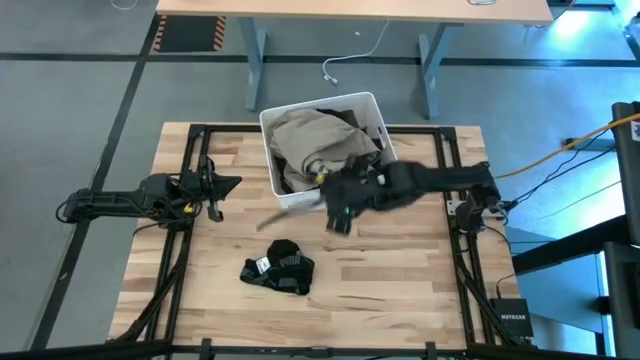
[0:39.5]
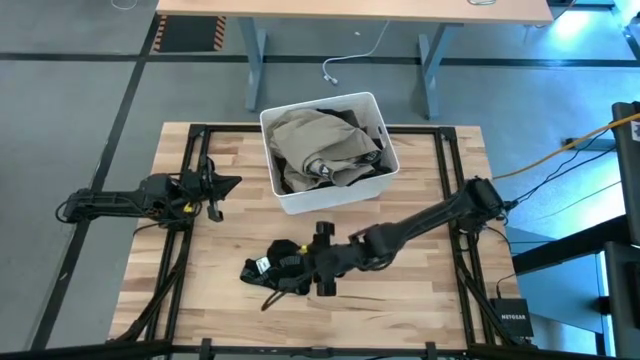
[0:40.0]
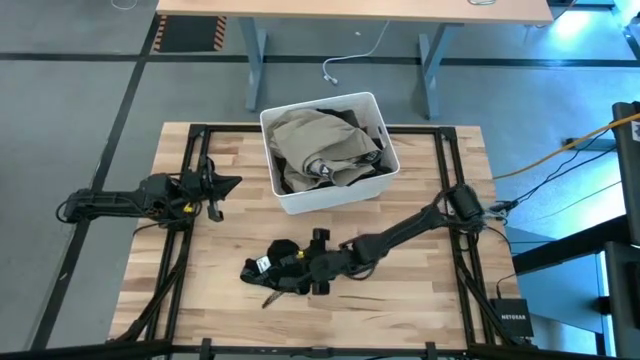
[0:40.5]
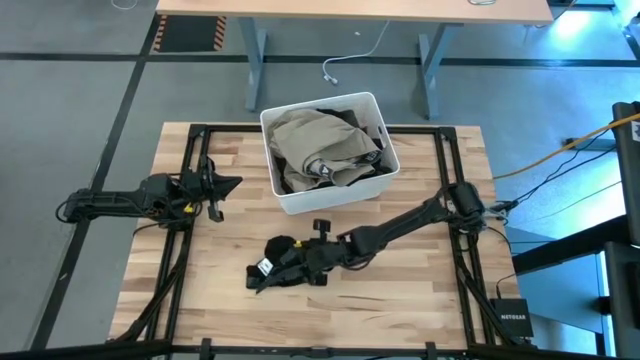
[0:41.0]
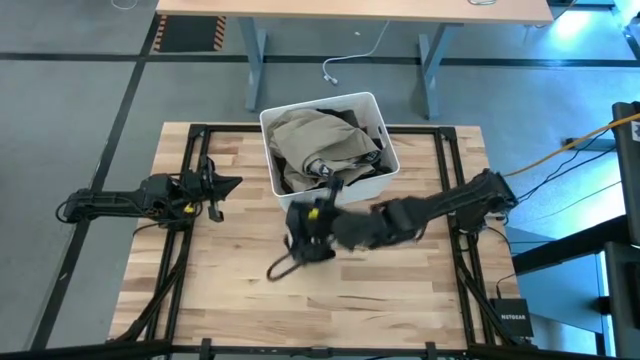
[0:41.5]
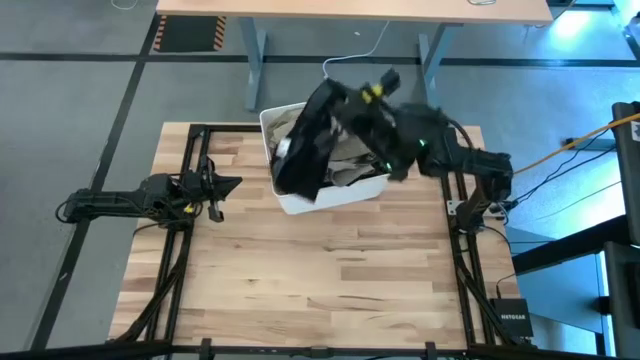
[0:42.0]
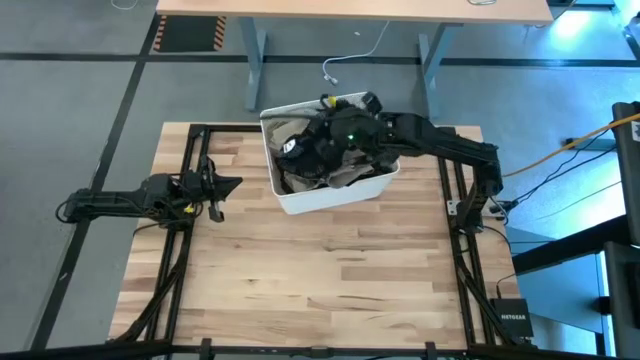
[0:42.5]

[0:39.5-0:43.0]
Task: Sort clothes
Put the black boxer into the white bin

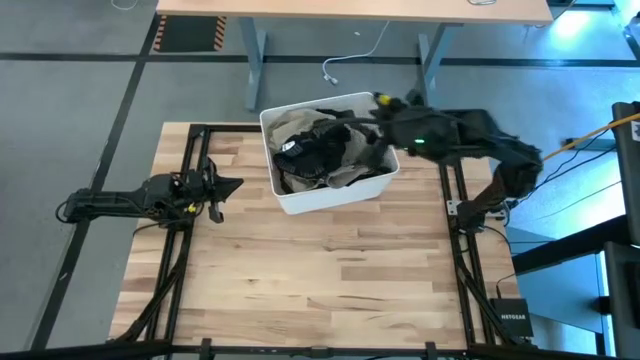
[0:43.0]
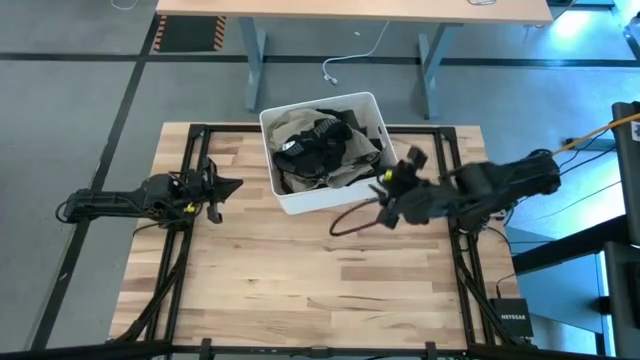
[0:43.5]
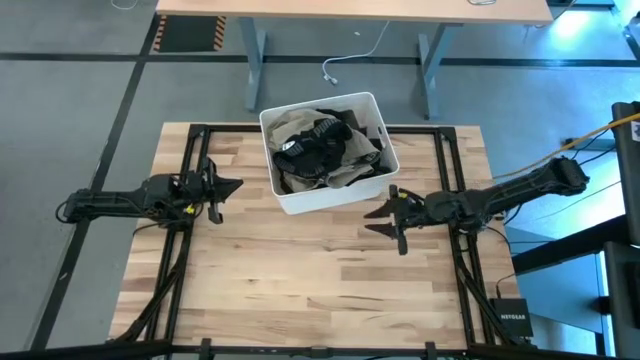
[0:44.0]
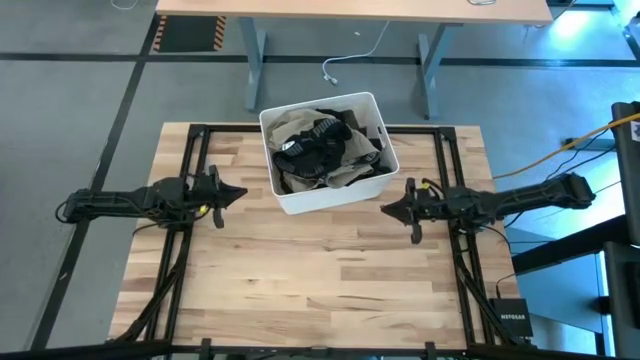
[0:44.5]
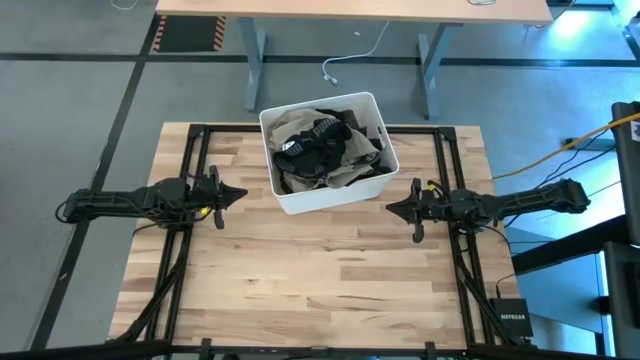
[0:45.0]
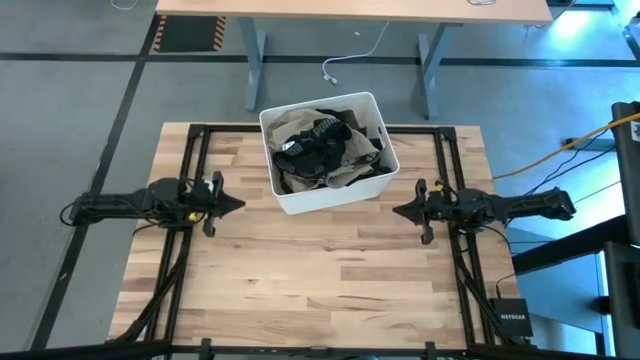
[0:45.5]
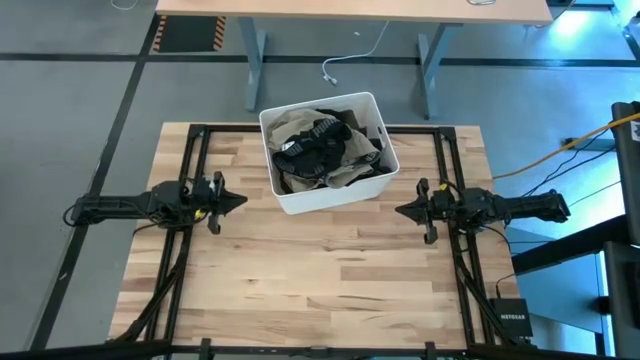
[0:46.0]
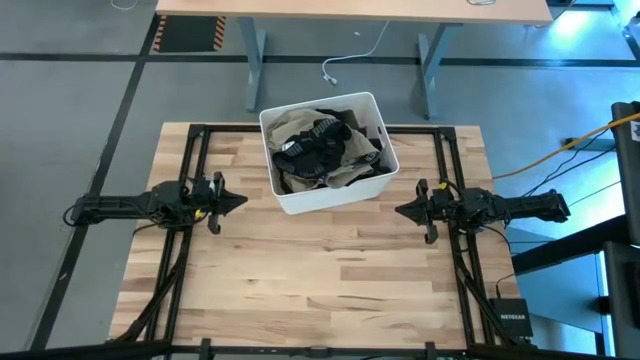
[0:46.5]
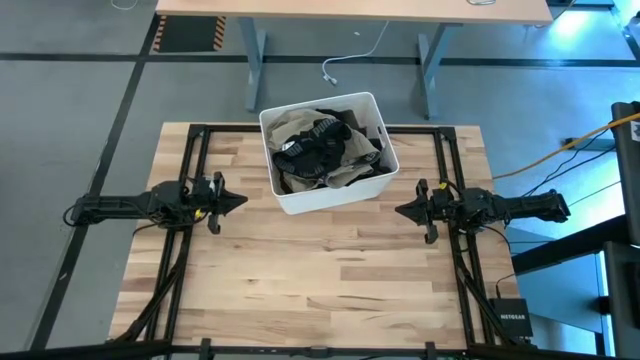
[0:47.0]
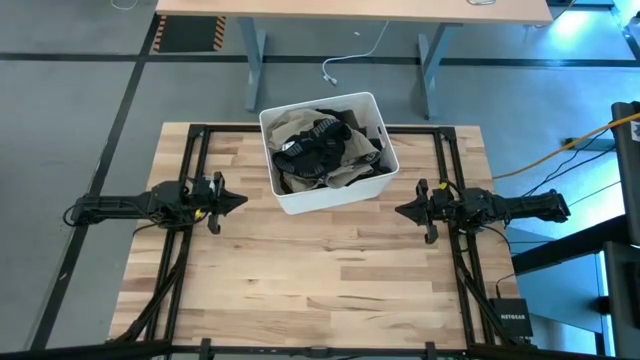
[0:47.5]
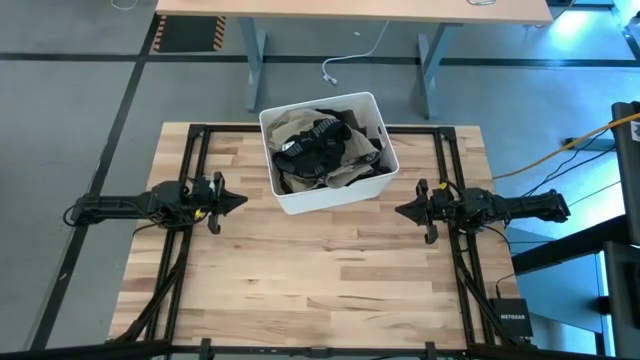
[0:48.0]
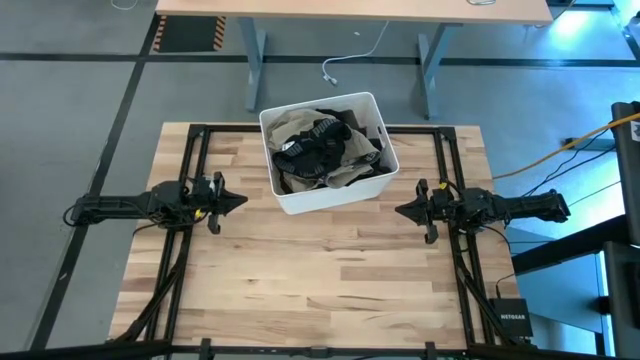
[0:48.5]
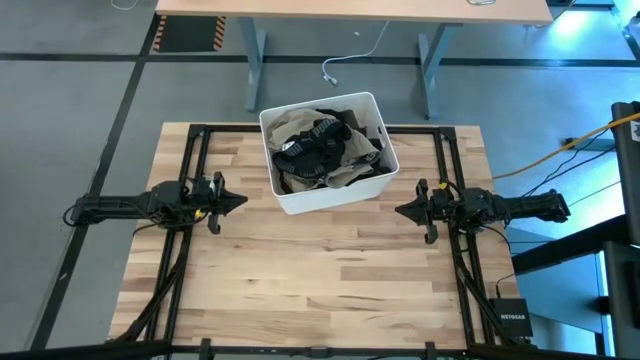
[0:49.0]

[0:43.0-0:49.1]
Return to Home Position

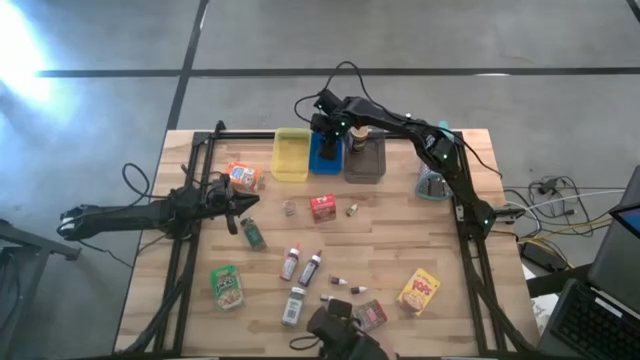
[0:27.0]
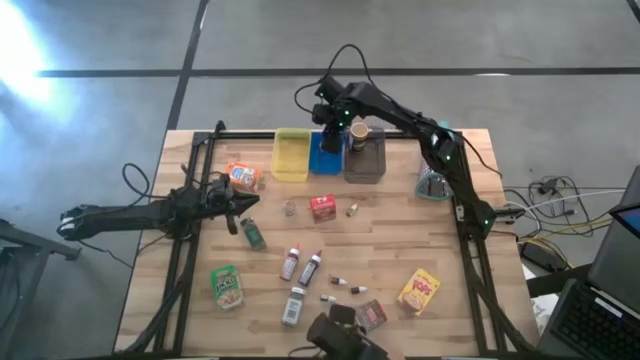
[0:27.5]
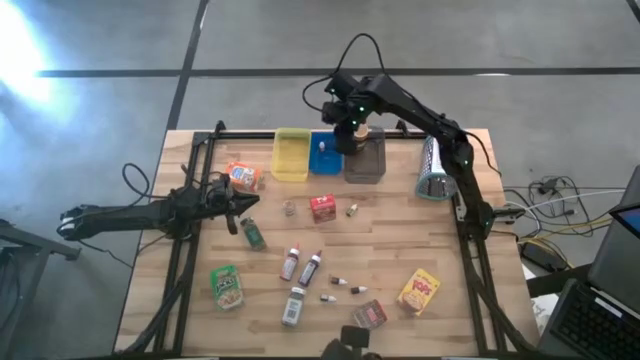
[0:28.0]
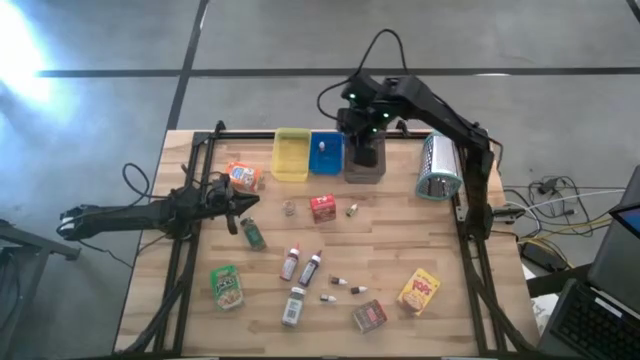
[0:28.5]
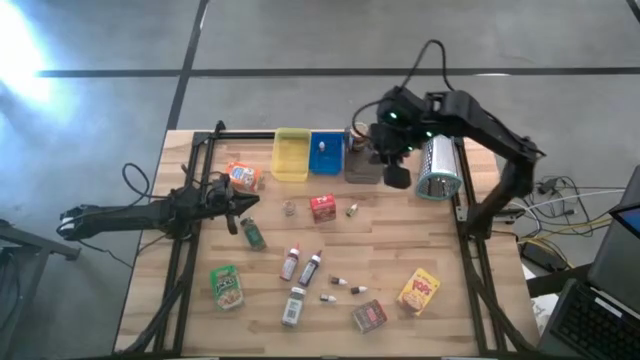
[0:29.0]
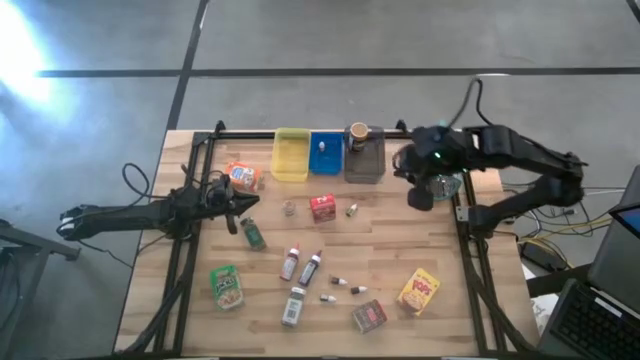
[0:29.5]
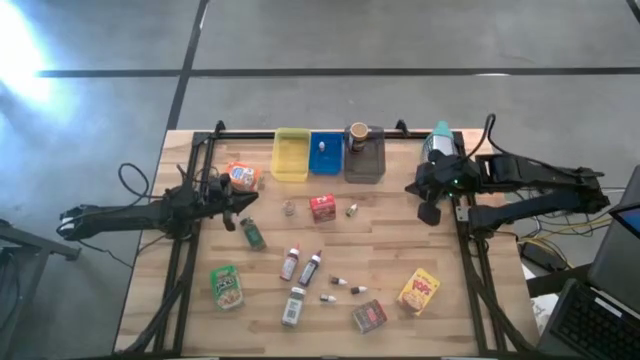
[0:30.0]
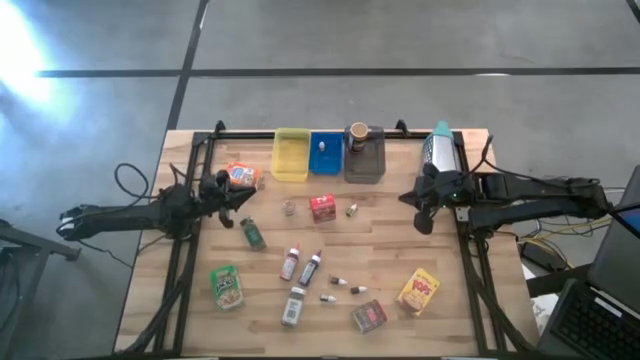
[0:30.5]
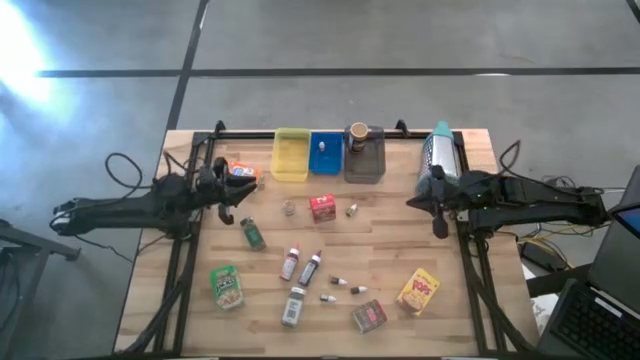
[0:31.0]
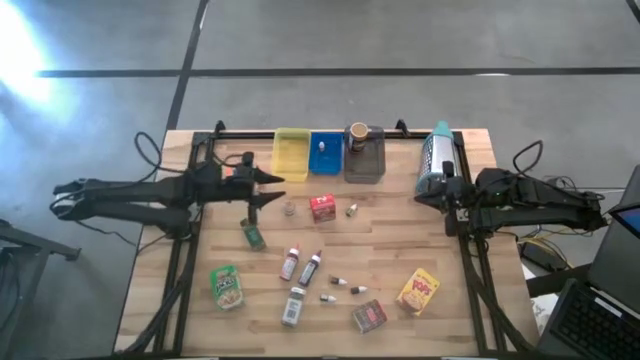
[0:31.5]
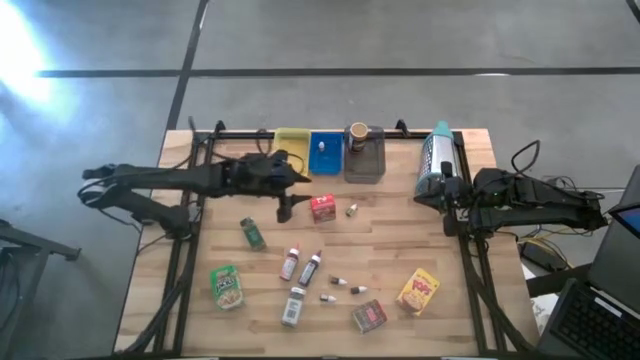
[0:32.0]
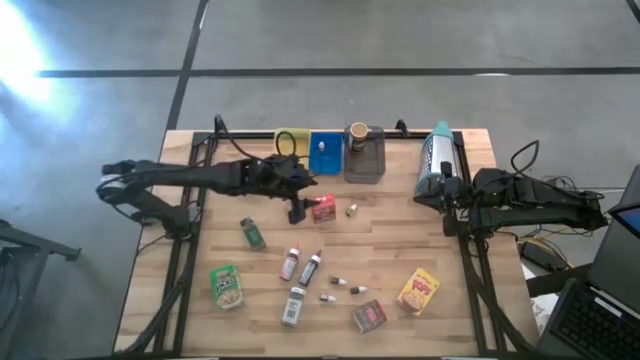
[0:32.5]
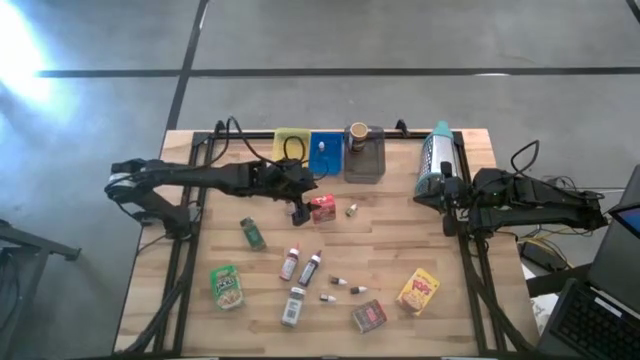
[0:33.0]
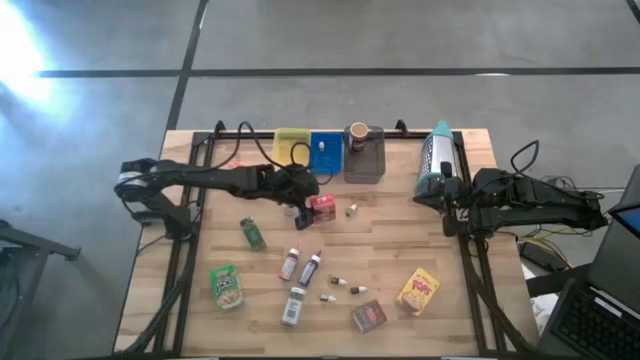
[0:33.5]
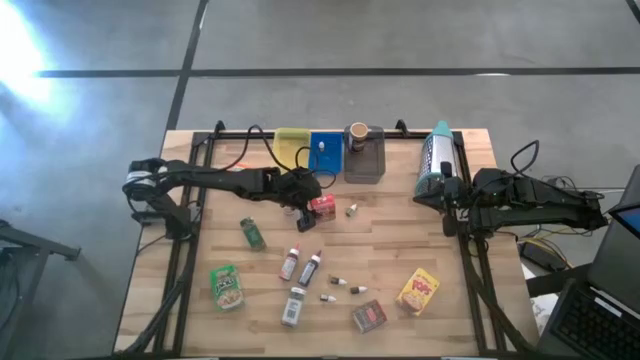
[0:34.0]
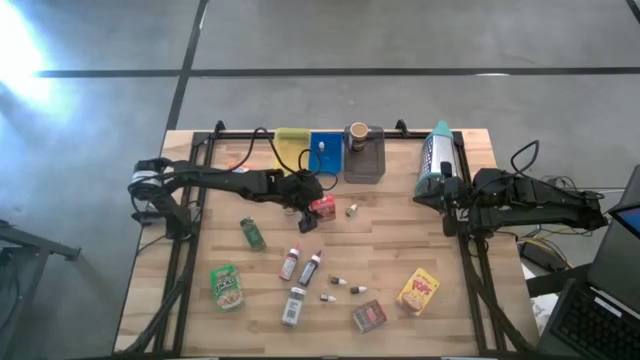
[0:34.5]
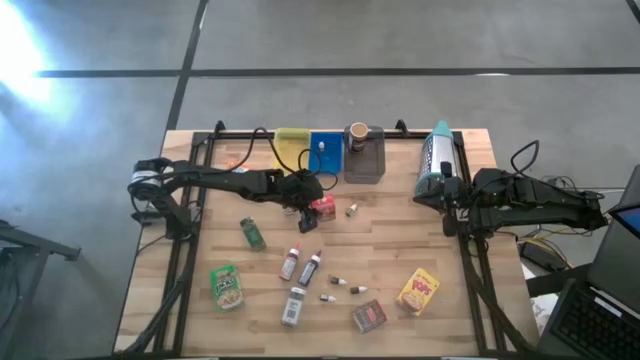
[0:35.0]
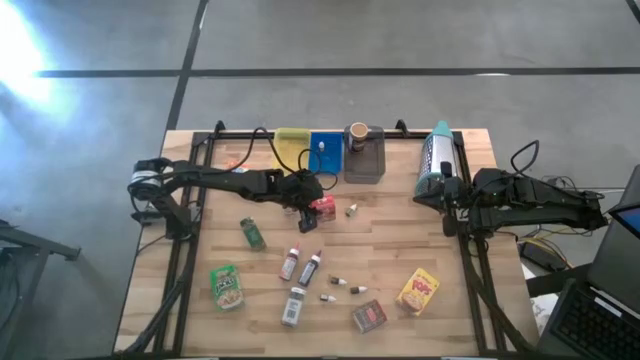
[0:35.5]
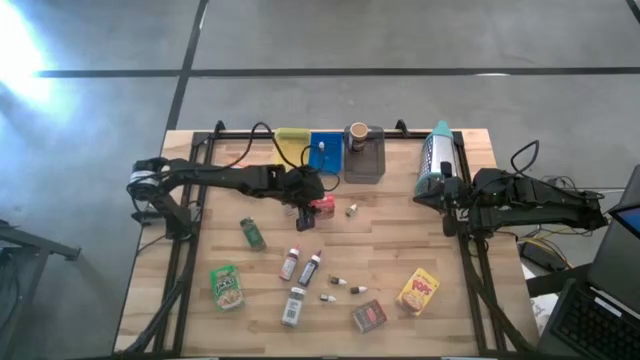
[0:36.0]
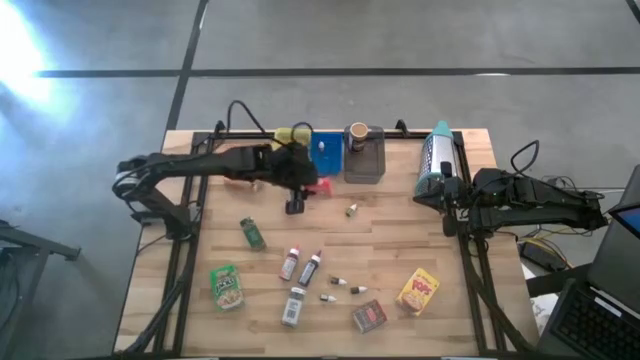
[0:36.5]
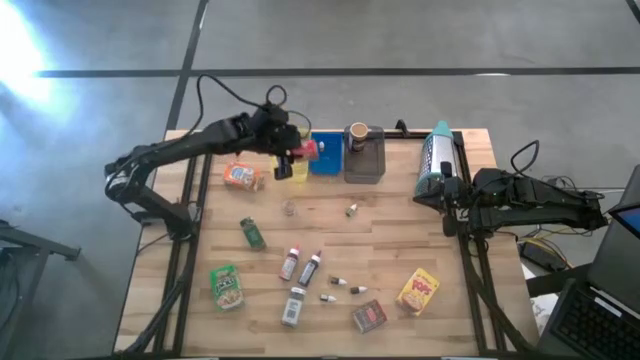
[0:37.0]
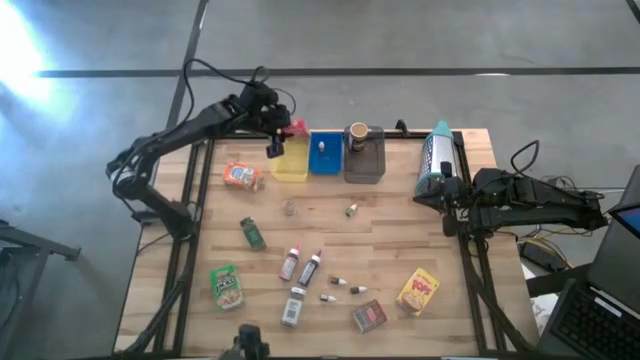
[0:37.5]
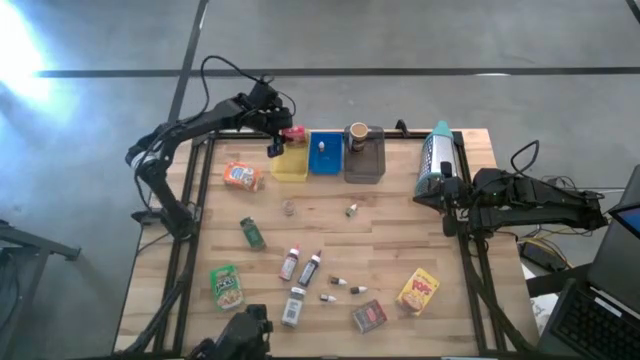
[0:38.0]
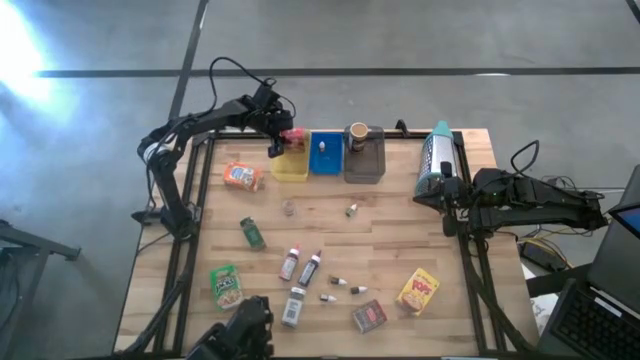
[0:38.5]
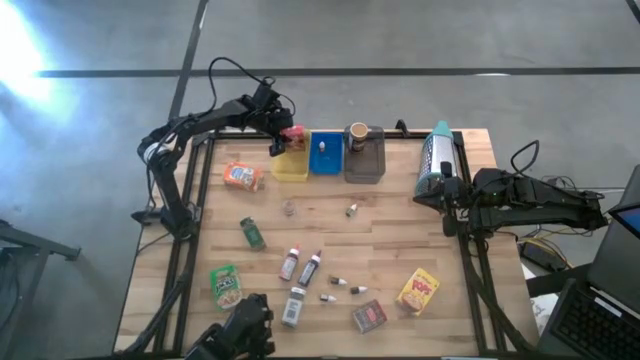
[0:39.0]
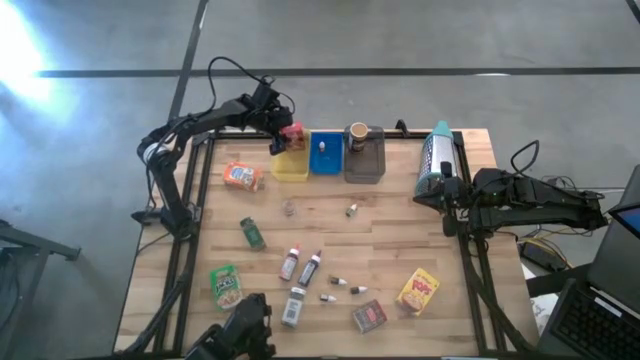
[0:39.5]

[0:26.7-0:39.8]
Task: Pick & Place Kitchen Items
Put the red cereal box into the yellow bin
